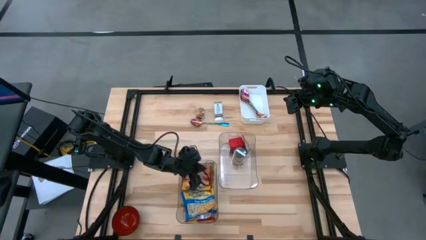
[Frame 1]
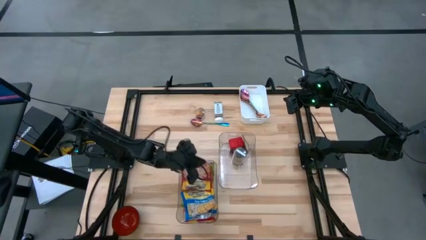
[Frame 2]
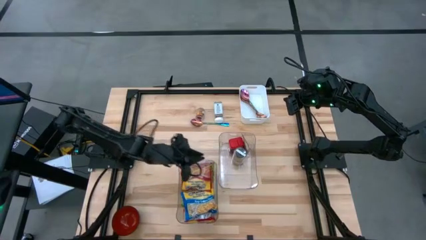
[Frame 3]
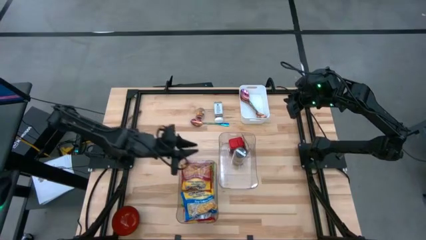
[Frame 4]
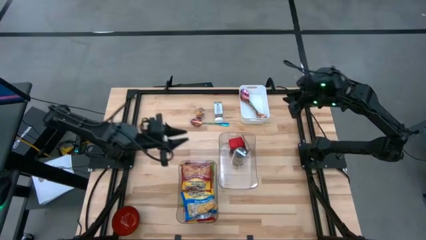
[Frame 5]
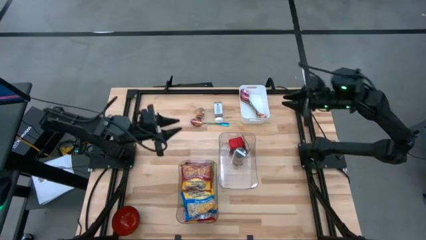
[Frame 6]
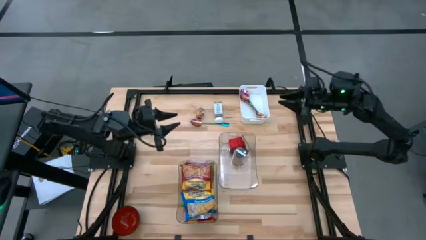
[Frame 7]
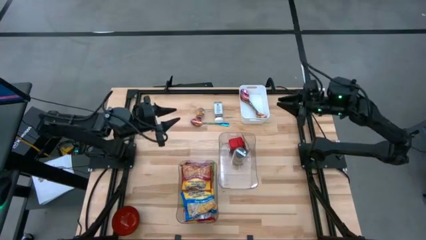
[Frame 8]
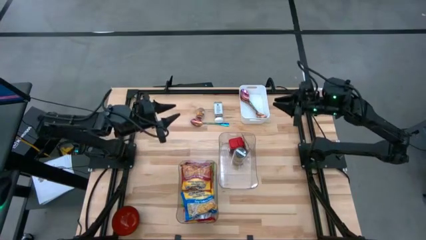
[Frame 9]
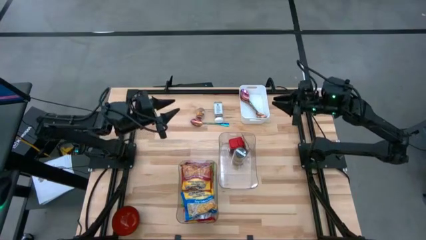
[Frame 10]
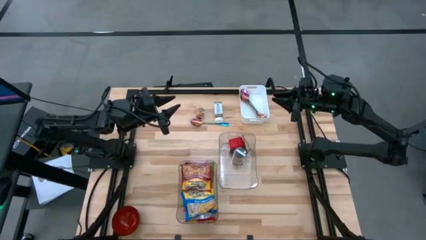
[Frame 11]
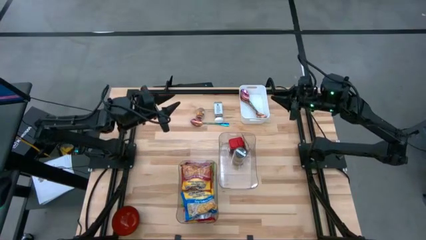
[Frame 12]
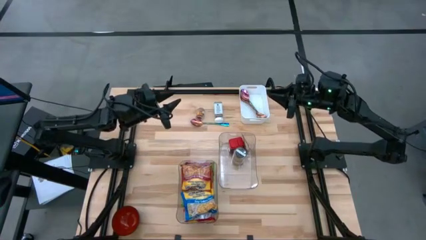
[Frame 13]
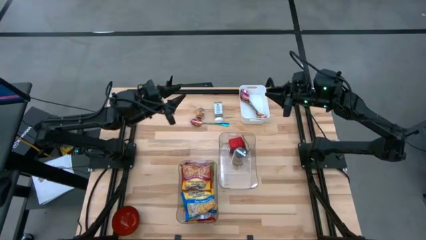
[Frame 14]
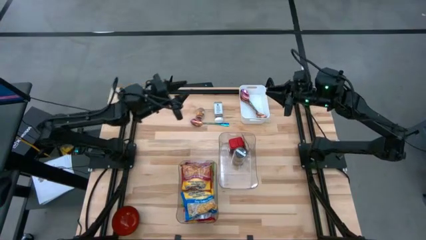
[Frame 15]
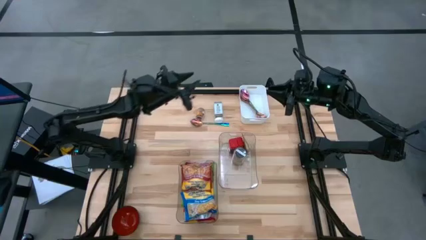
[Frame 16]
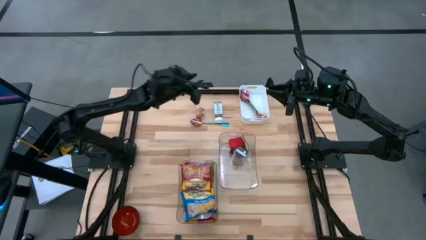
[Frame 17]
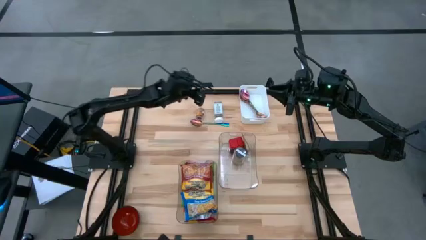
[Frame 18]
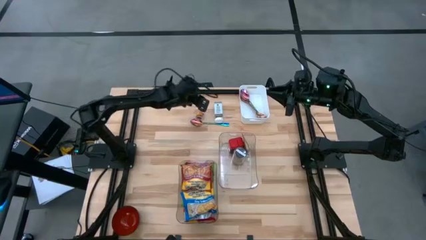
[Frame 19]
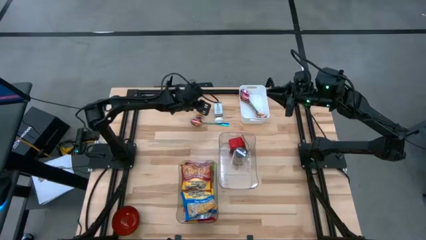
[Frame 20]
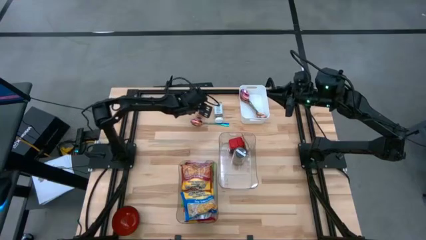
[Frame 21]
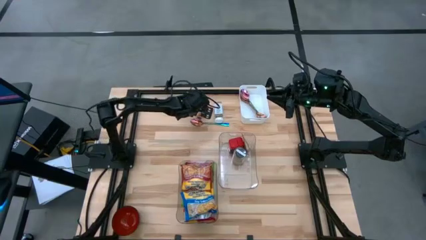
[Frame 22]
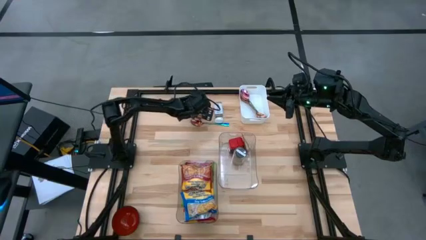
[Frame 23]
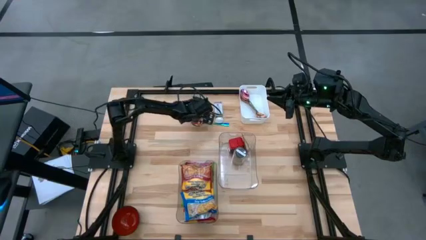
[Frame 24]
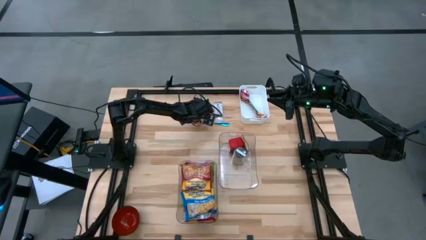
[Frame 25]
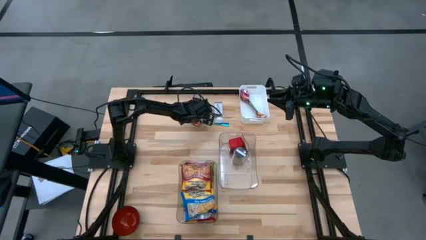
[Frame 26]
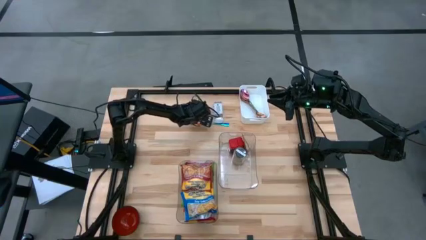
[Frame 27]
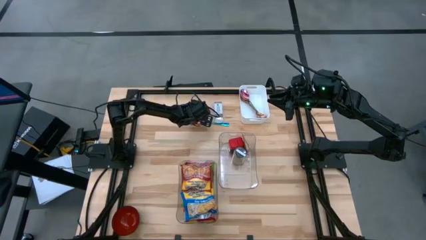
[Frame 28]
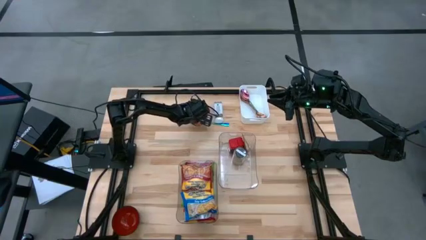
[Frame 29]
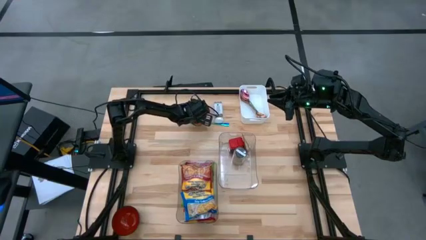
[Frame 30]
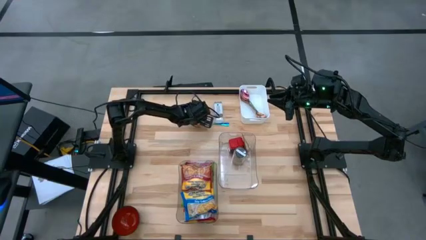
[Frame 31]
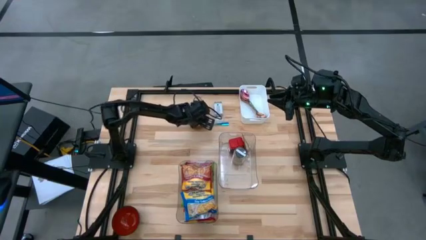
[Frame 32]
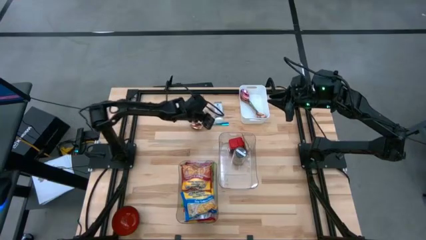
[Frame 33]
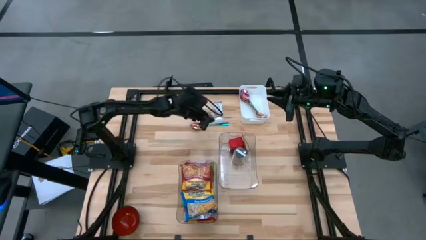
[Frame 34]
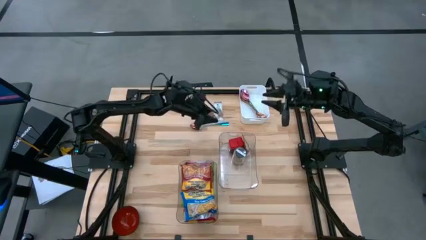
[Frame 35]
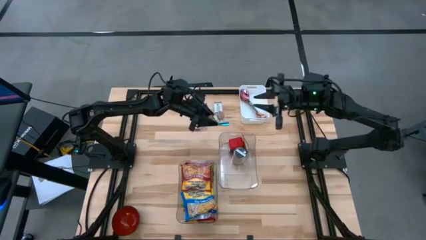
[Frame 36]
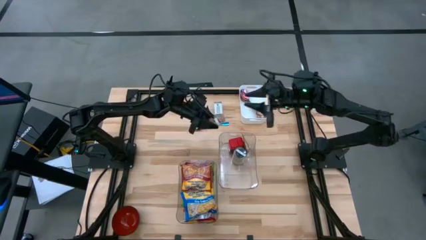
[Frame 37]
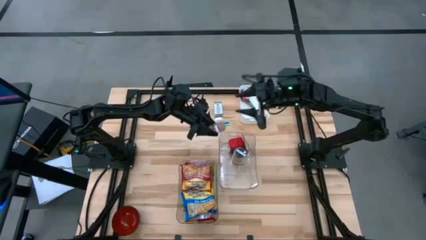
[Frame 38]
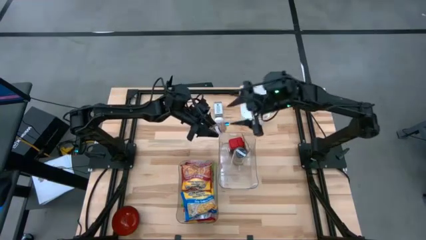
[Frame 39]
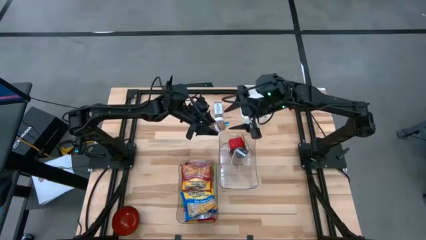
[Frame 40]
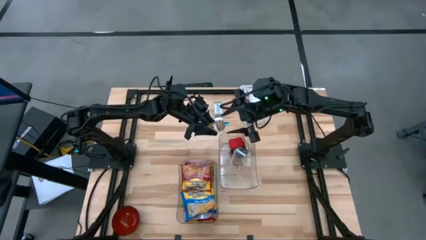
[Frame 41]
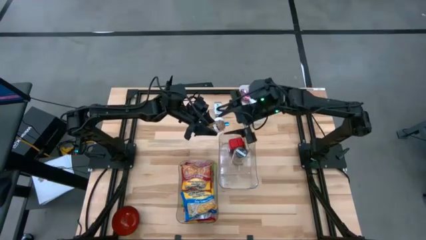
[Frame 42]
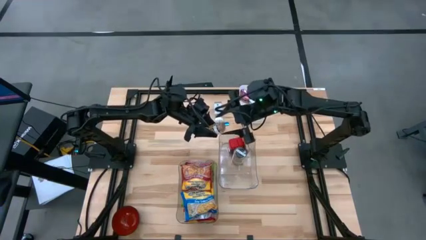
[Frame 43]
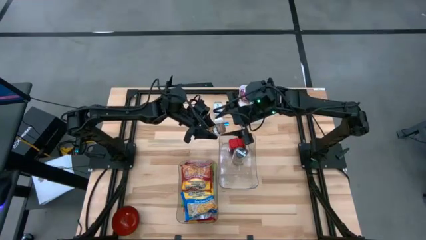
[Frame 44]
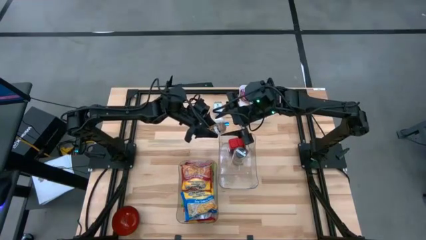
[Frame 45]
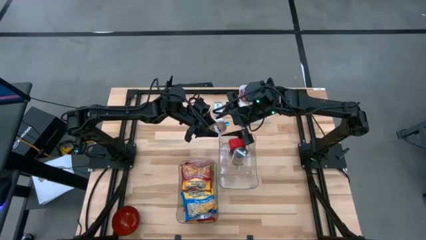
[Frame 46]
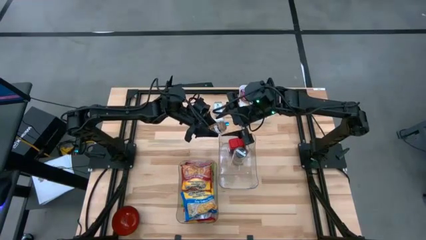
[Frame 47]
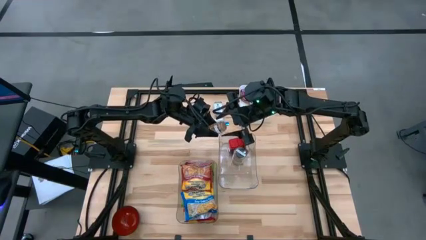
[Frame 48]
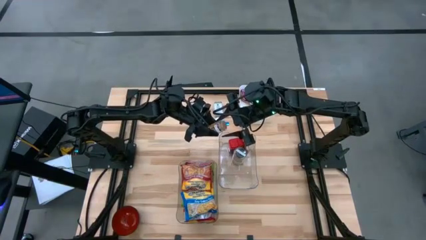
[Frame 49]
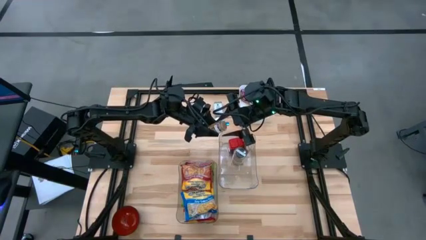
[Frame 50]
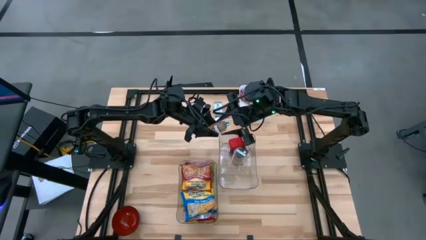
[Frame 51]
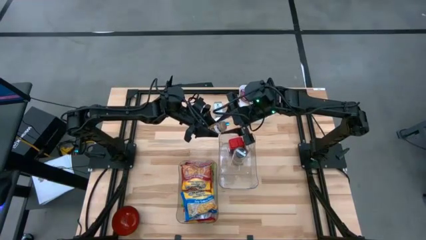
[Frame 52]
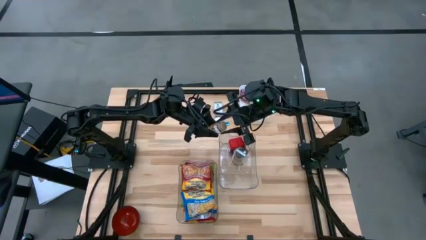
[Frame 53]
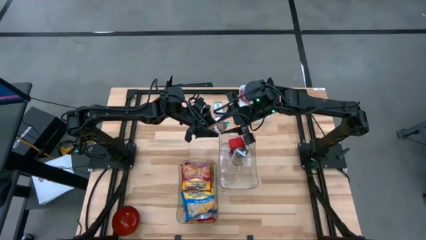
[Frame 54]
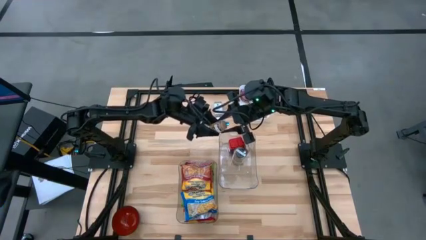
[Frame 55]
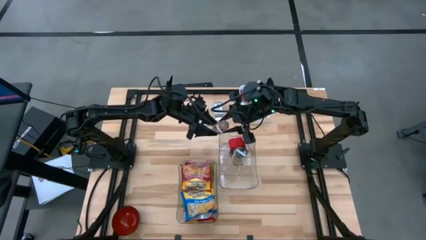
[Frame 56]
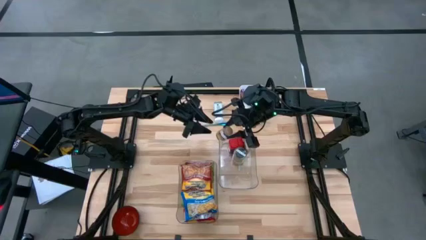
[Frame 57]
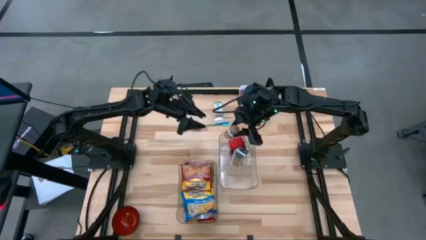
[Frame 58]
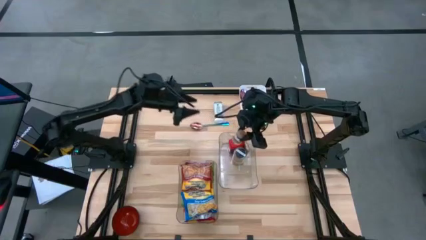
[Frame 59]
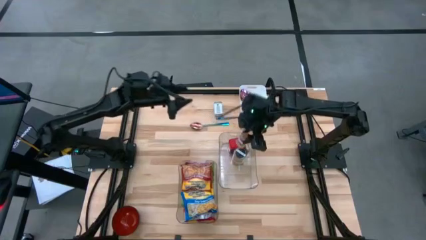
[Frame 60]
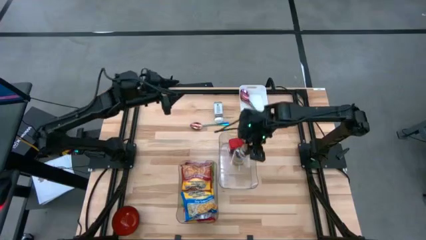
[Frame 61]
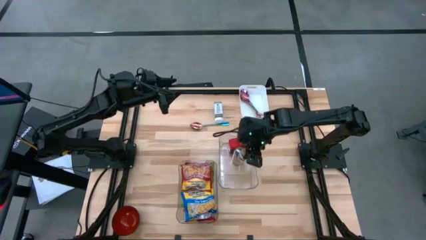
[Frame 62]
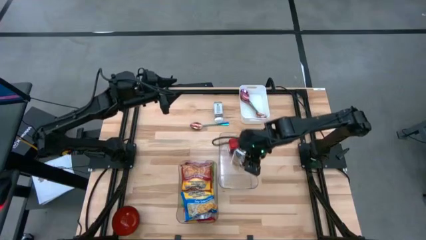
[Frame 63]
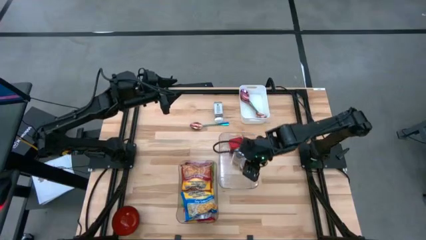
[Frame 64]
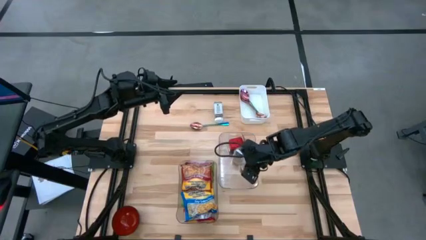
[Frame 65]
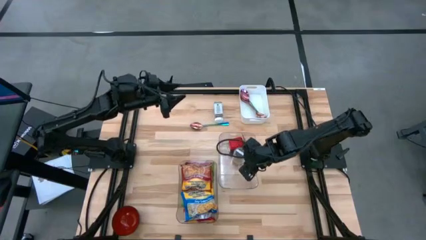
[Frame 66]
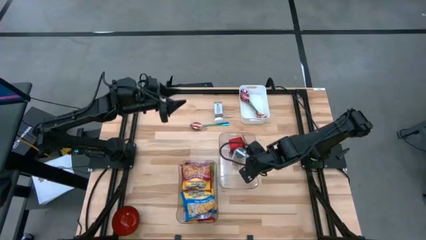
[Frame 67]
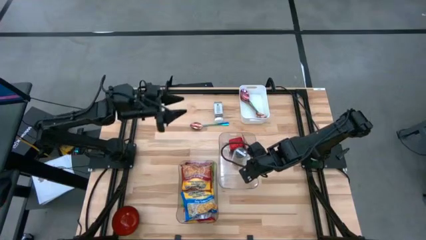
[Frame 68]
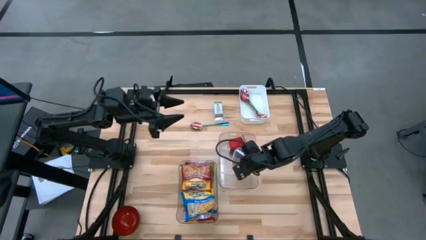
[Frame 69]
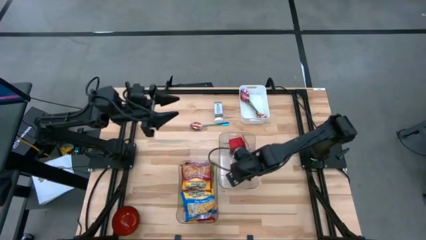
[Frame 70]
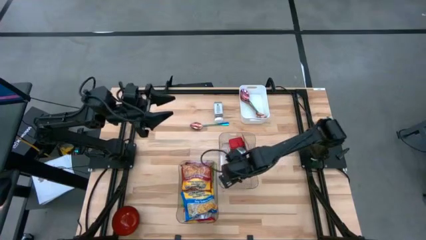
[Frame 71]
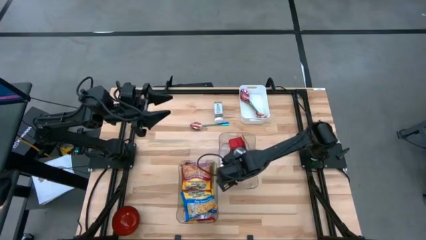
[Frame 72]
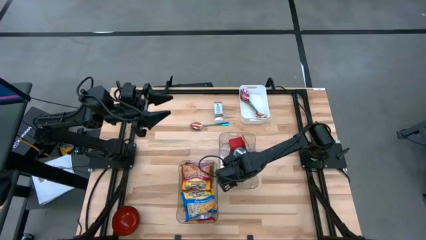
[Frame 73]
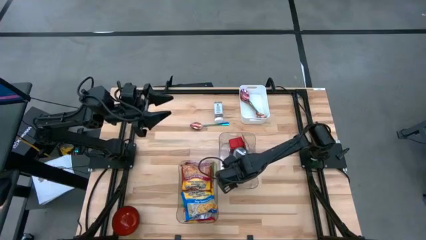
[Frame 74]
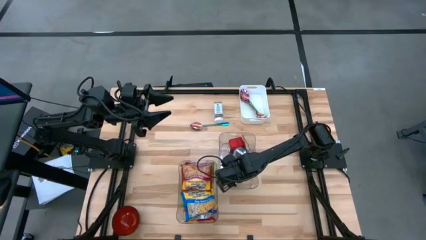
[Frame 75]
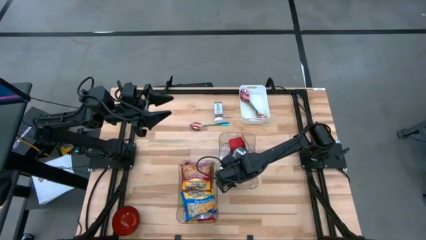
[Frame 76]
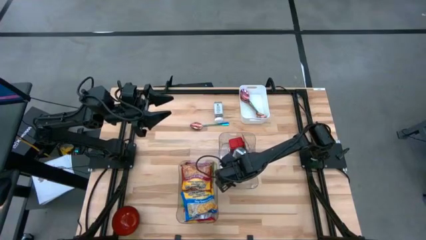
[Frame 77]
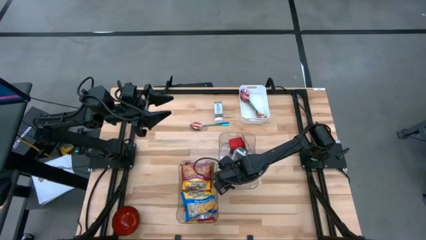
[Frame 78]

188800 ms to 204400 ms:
Task: Pick & Place Food Item
Put the brown seasoning bottle into the right transparent bin
